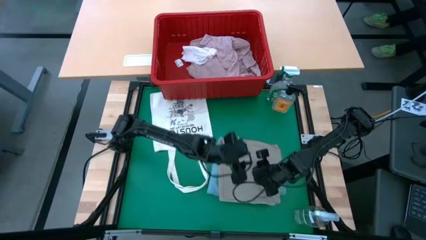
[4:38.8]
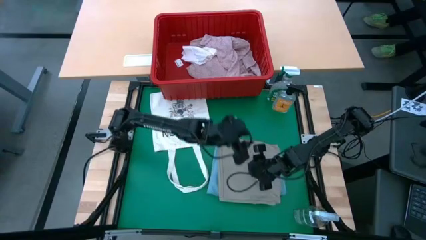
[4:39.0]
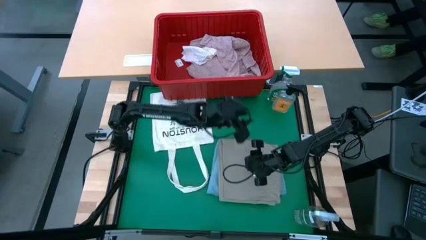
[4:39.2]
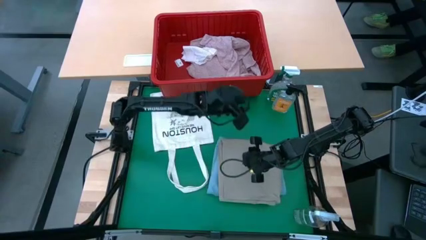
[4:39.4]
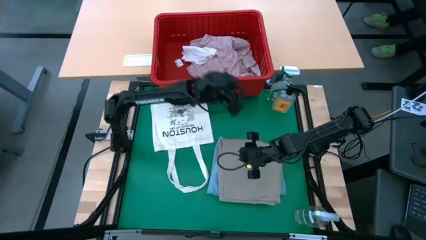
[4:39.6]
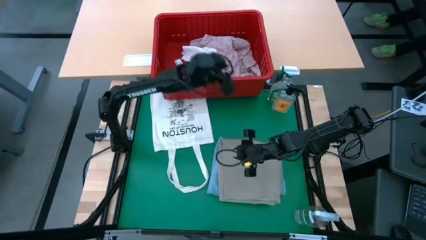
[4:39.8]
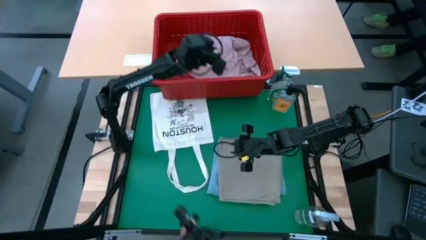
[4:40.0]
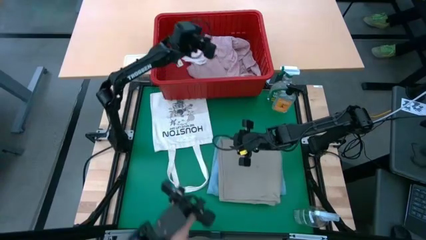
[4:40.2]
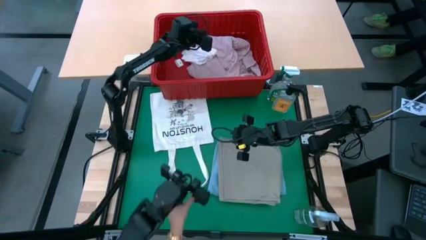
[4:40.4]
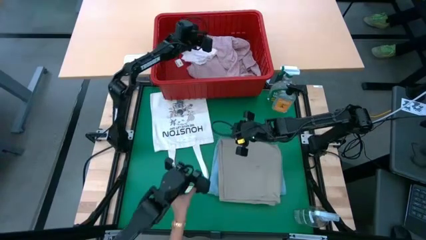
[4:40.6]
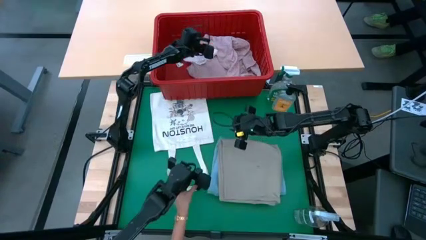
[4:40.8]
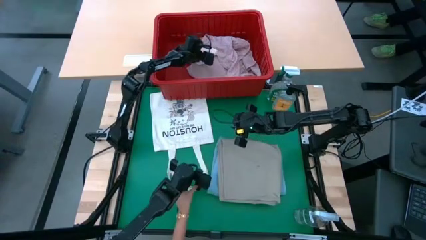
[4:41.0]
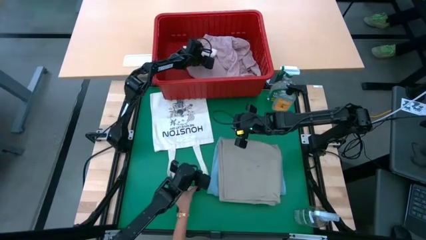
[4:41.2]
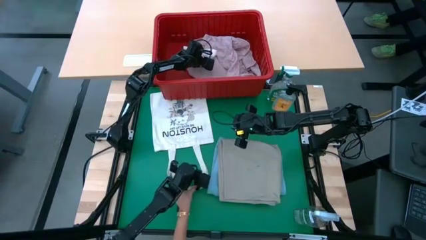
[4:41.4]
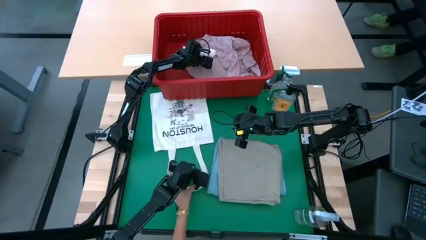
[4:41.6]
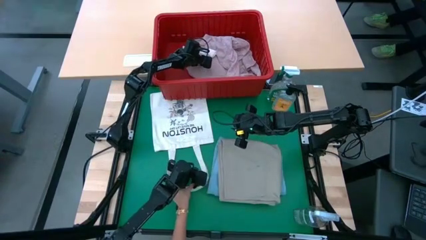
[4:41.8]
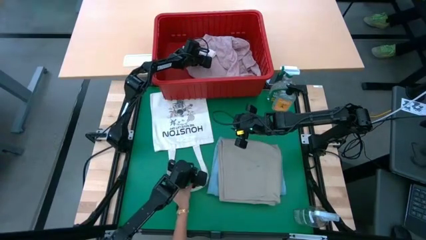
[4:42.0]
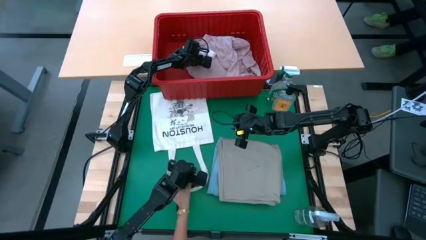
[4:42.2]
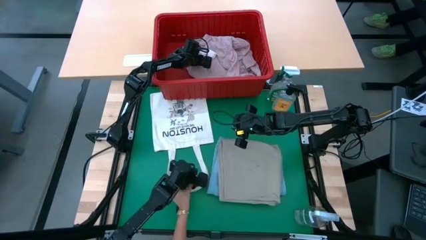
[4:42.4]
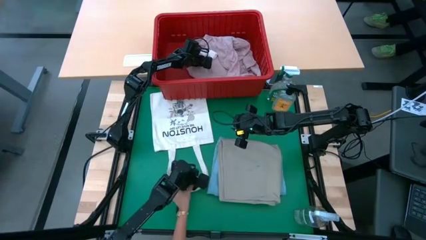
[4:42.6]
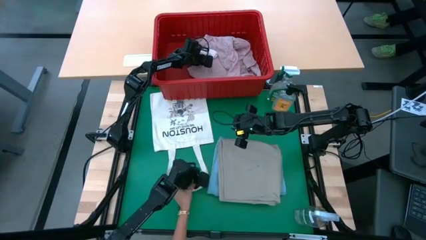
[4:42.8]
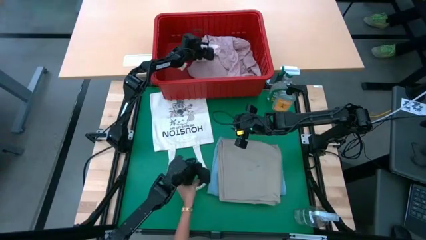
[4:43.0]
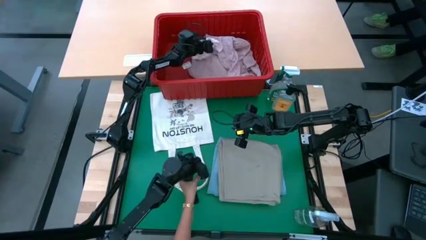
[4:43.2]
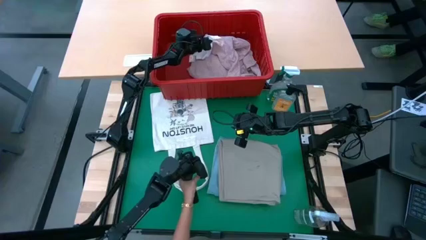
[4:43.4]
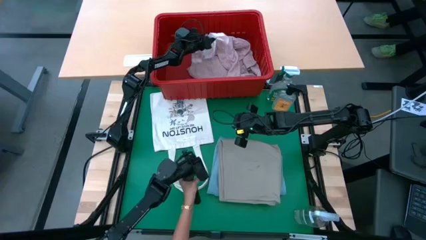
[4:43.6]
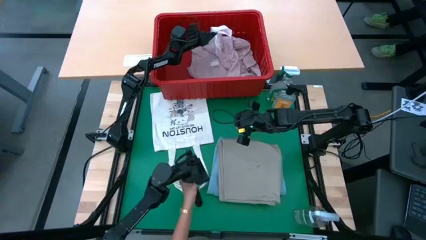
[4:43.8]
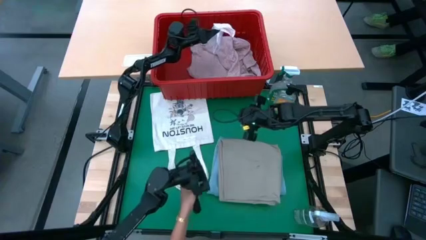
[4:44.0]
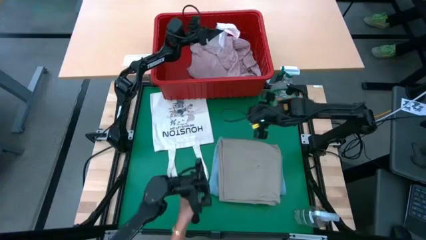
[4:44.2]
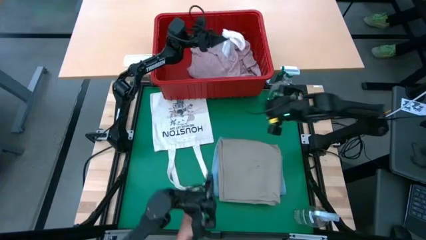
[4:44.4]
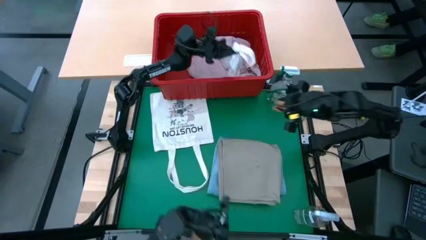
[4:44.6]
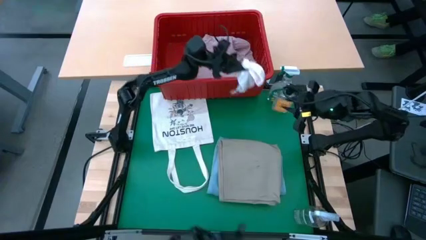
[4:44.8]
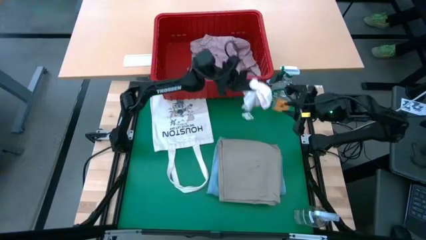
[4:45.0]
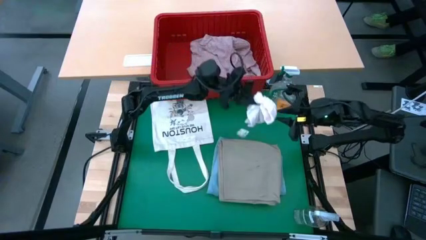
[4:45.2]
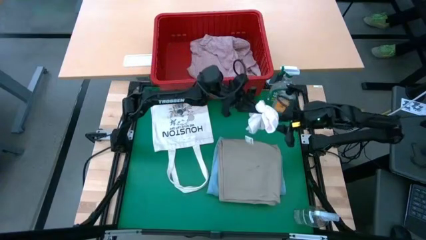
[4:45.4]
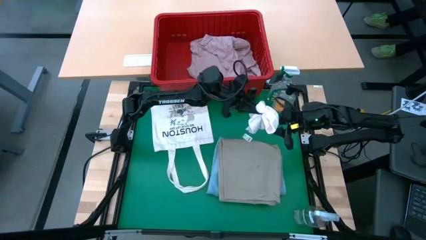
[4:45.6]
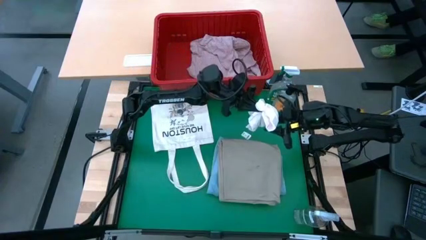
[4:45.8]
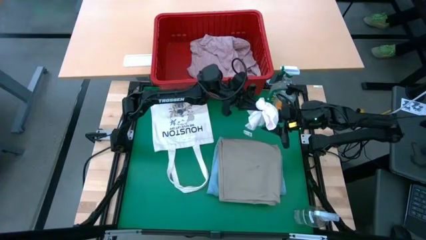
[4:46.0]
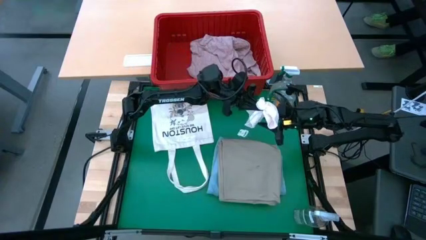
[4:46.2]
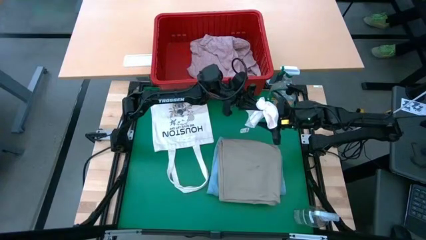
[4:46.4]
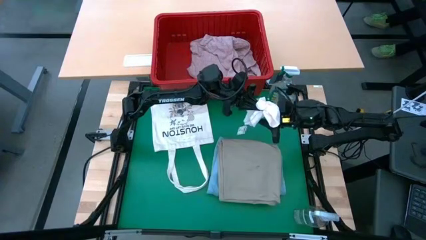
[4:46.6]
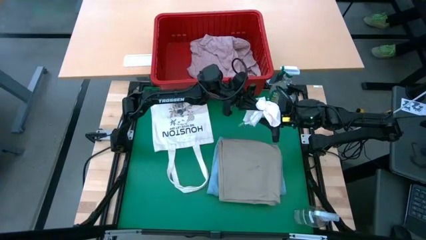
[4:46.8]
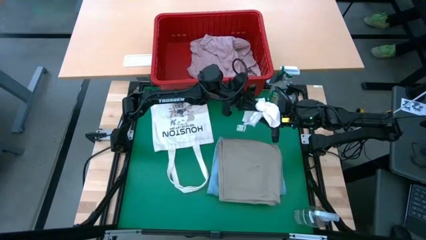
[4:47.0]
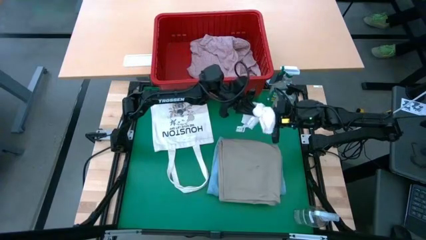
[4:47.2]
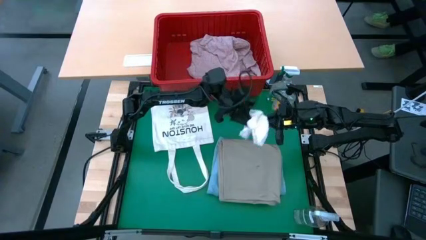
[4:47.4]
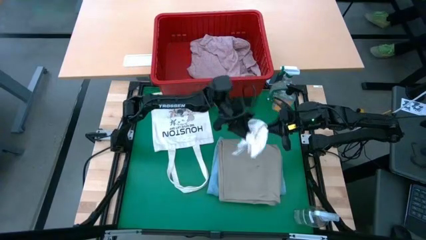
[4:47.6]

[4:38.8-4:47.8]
Task: Fold laundry
Remove the white underwear from the red bin
